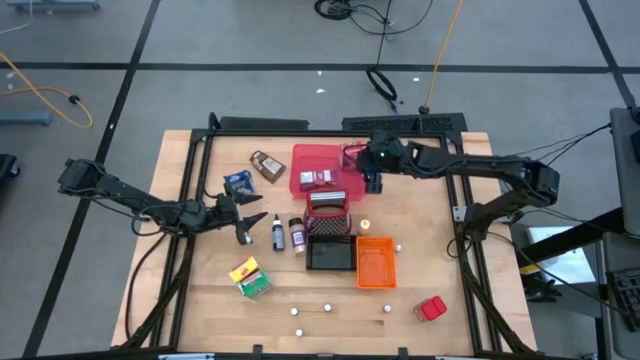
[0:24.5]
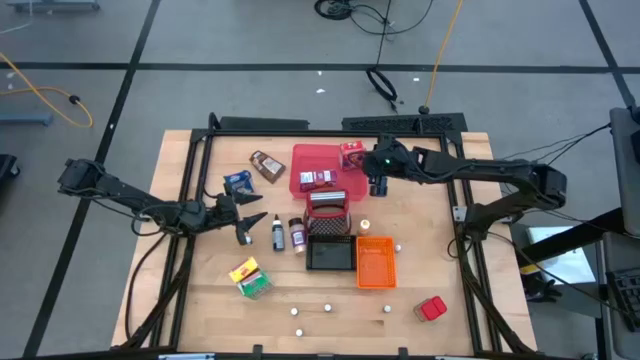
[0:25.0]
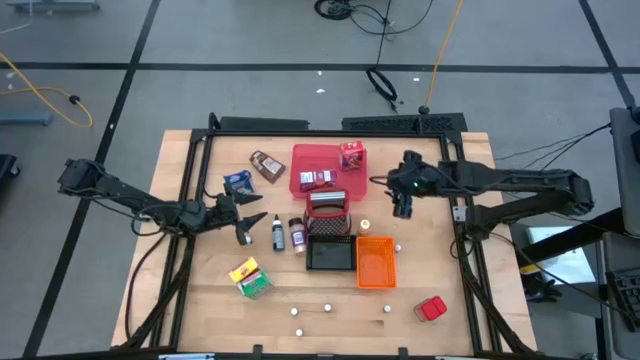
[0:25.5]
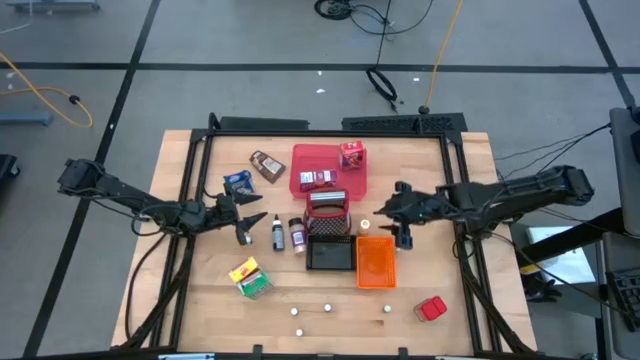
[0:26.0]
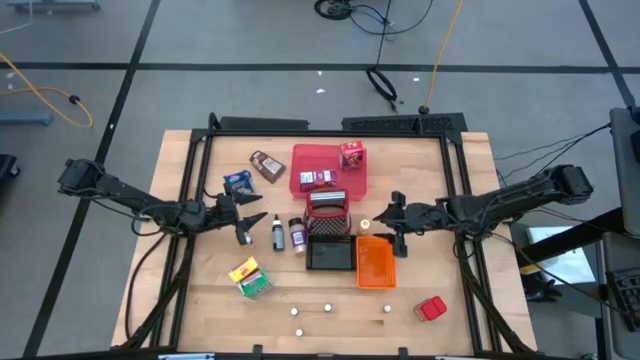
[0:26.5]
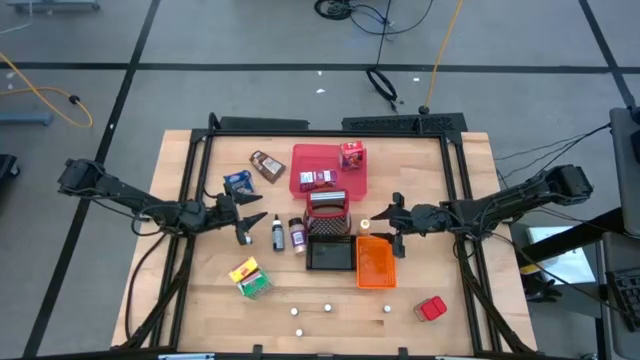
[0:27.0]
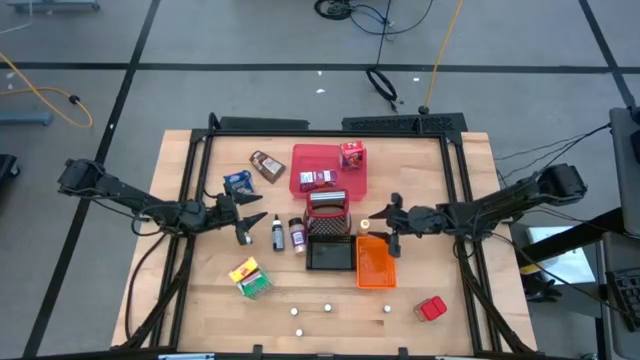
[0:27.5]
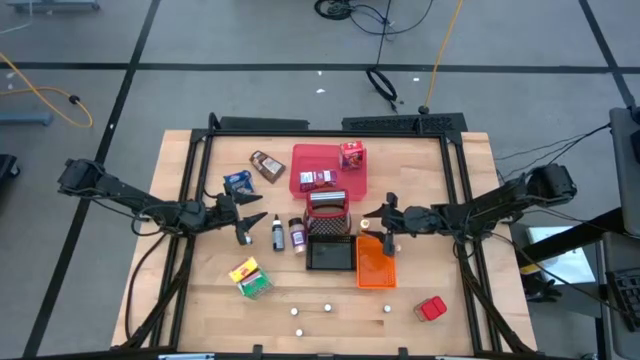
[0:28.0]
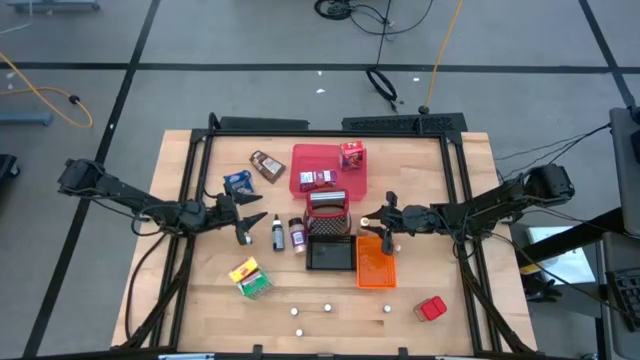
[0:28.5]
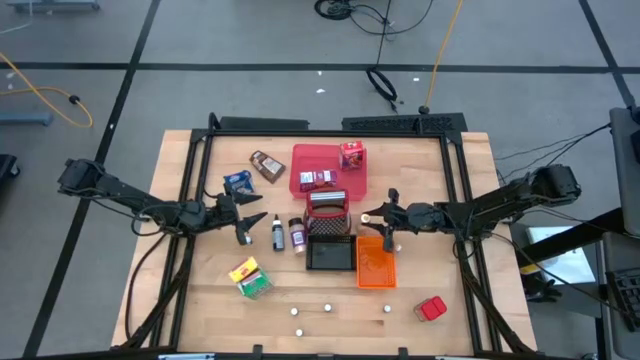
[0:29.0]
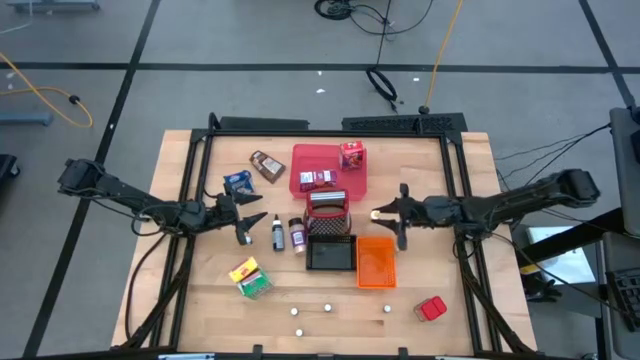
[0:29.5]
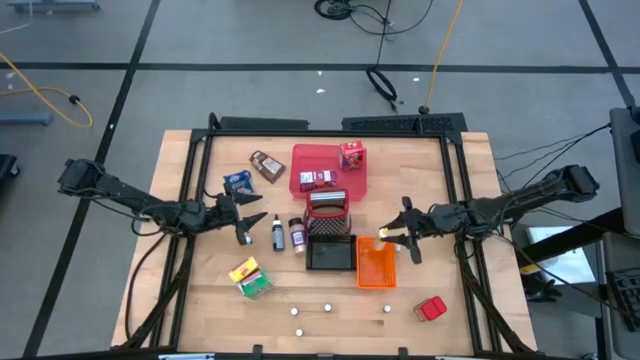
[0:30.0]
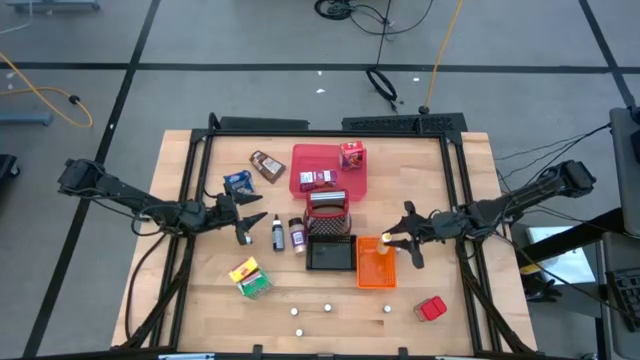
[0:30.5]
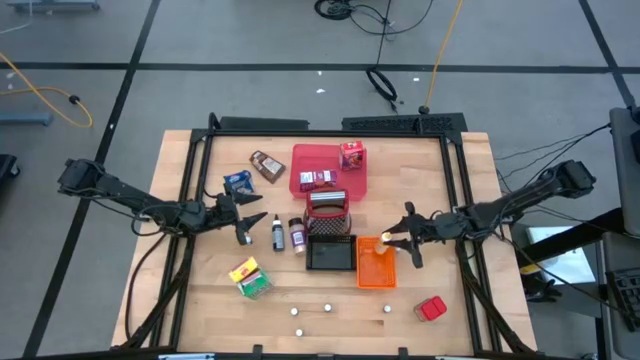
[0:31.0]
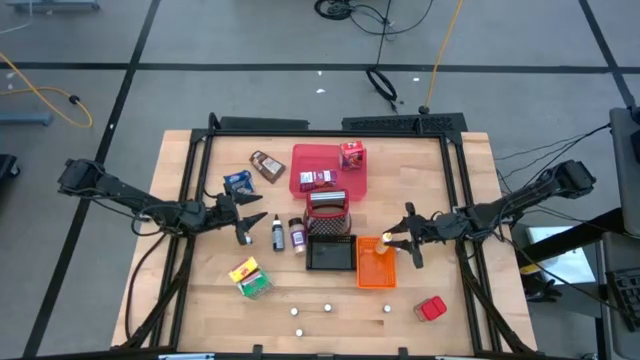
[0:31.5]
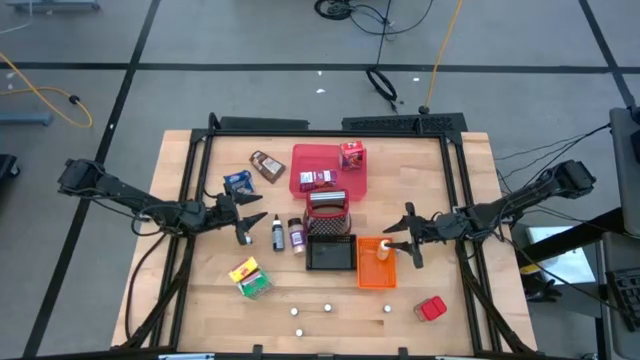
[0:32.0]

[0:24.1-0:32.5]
Task: Pick & Place Kitchen Items
Put the yellow food coloring bottle into the orange bin

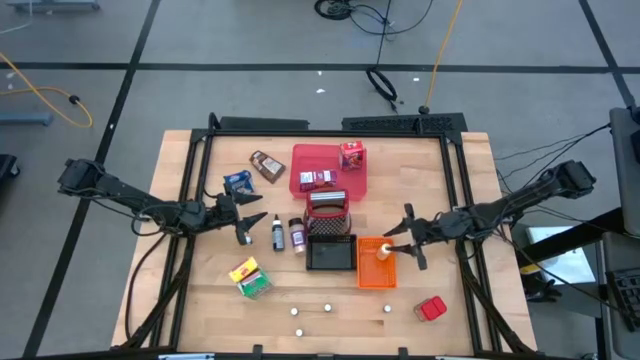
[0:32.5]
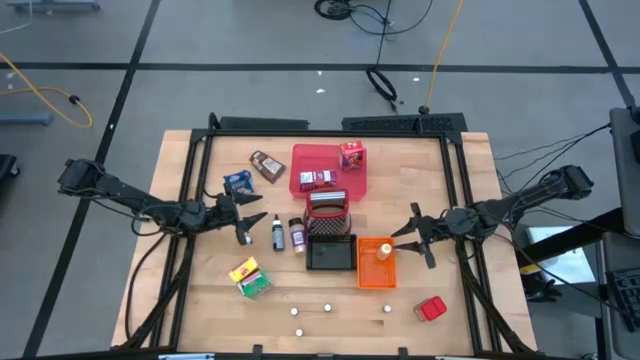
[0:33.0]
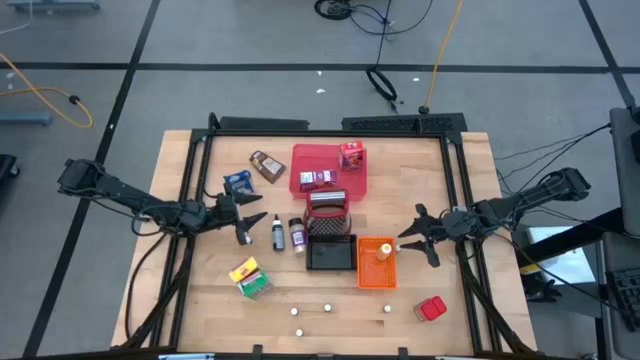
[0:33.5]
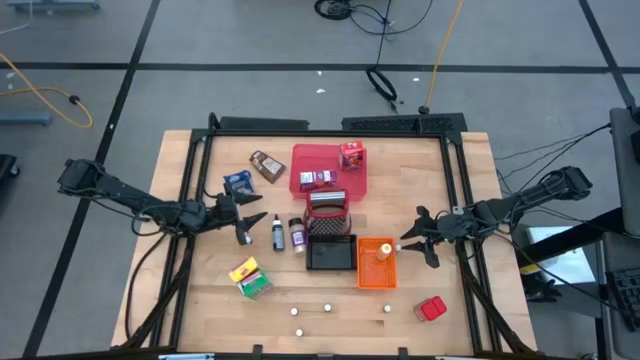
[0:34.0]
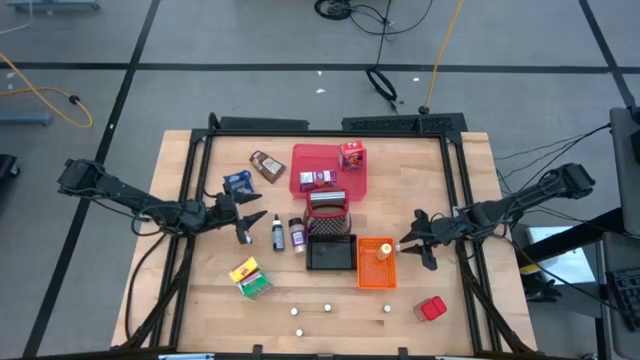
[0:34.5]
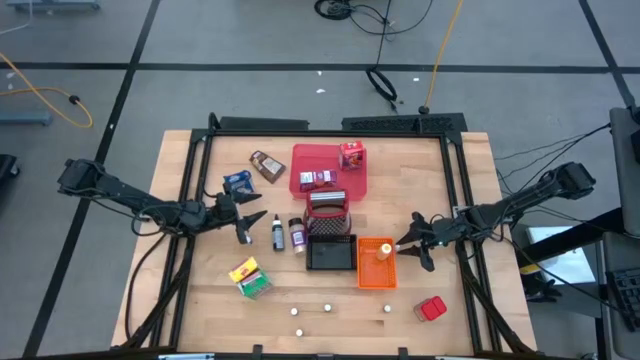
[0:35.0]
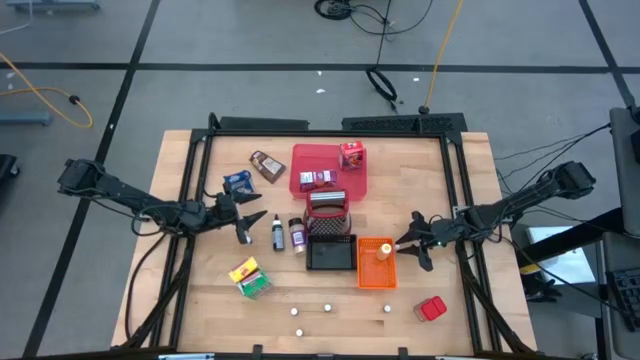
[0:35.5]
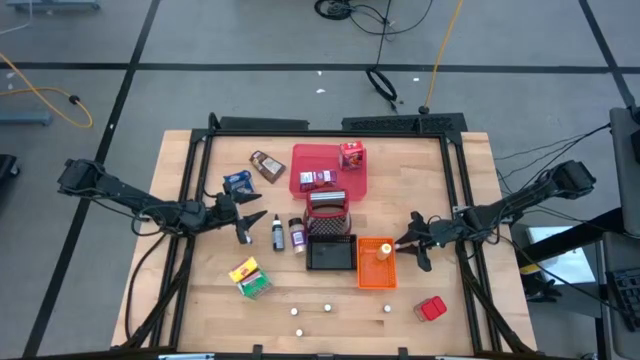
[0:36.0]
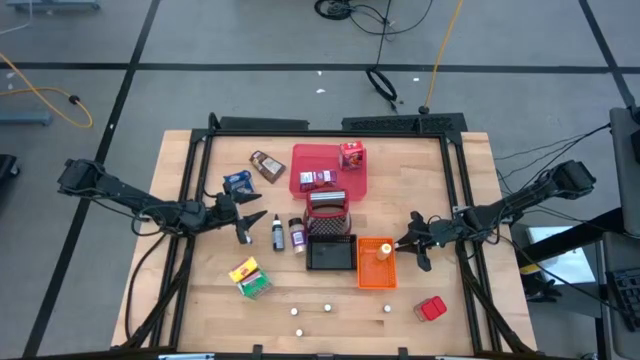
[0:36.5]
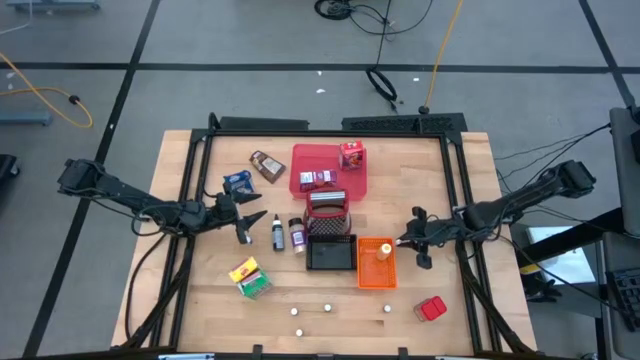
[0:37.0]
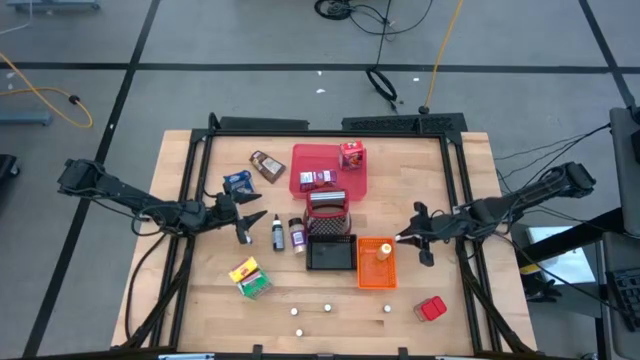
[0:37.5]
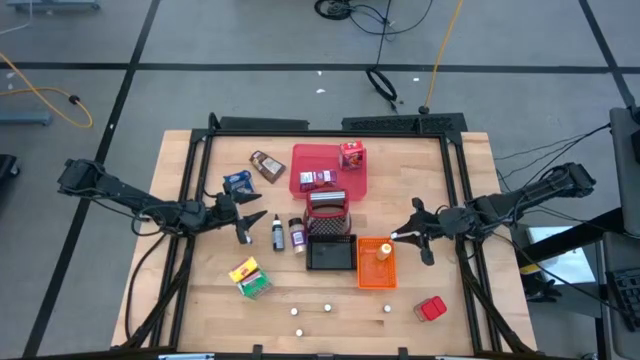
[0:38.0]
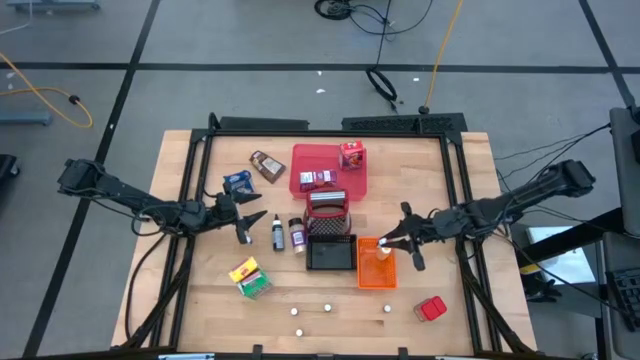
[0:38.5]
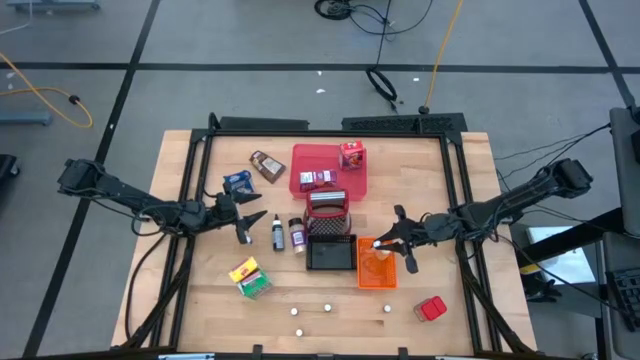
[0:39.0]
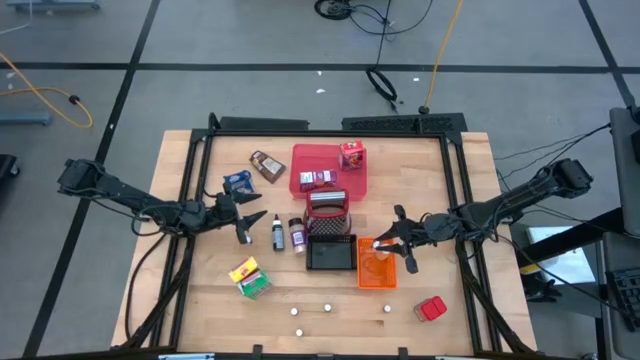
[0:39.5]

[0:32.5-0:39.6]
Put the pink food coloring bottle into the orange bin

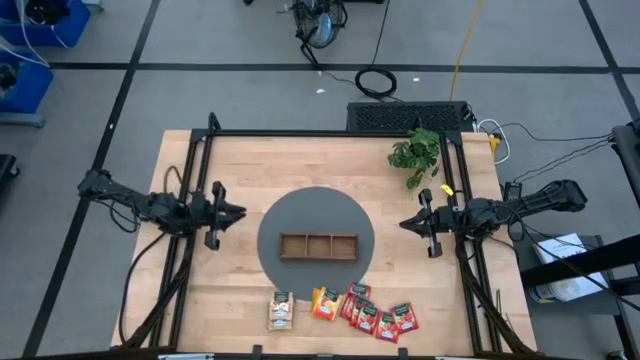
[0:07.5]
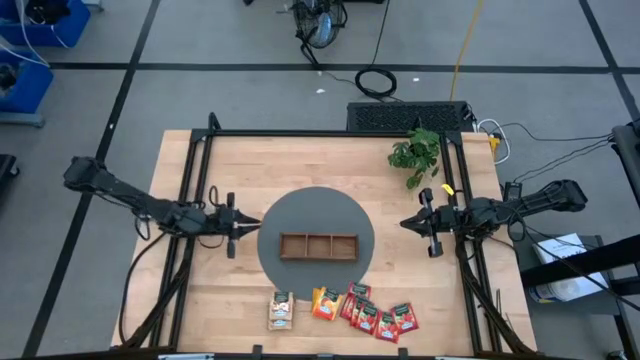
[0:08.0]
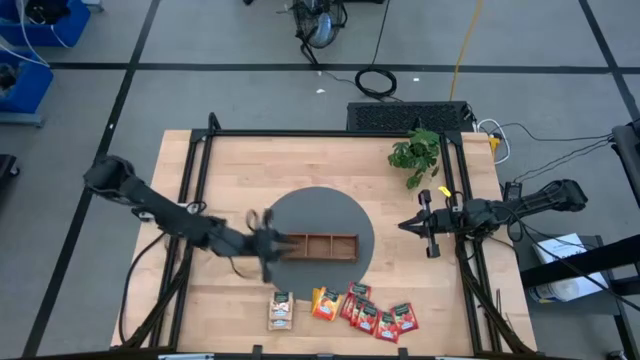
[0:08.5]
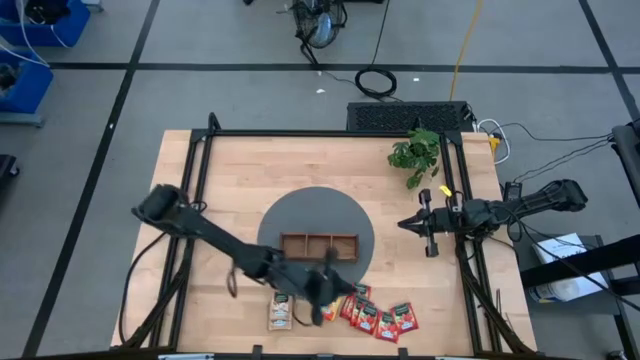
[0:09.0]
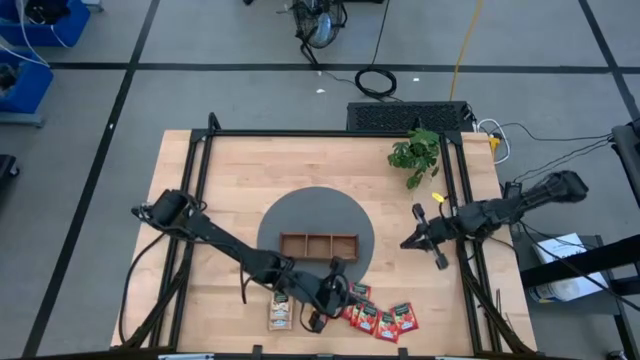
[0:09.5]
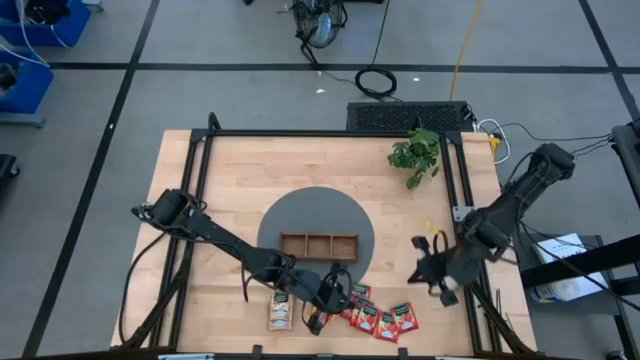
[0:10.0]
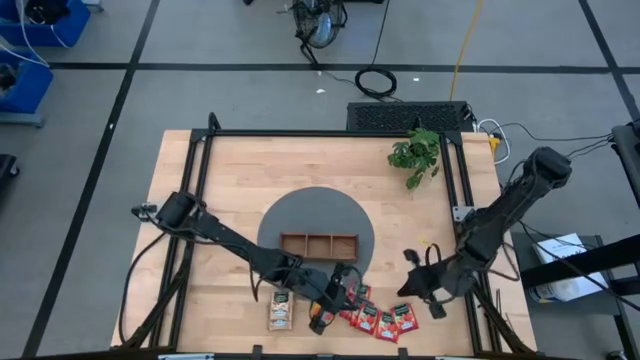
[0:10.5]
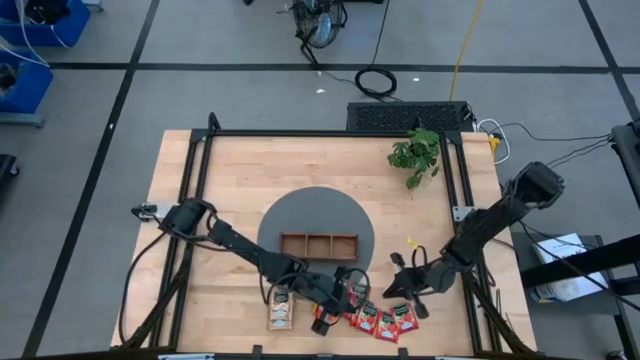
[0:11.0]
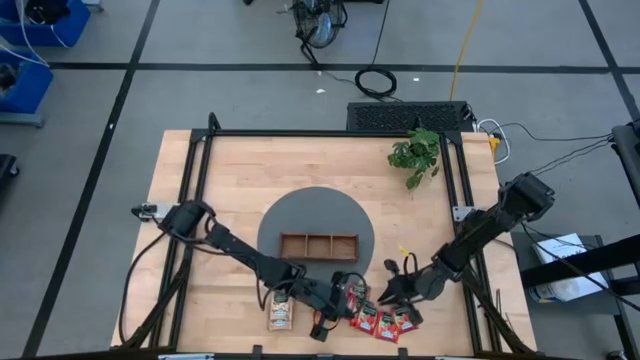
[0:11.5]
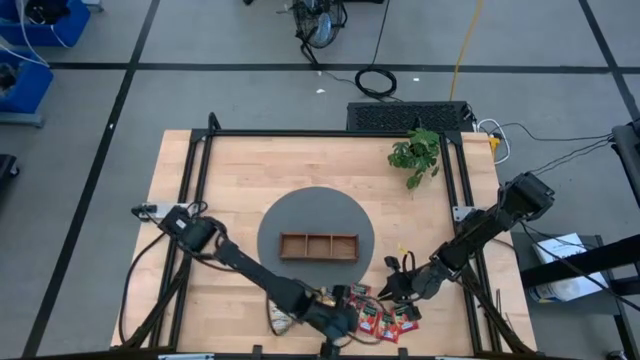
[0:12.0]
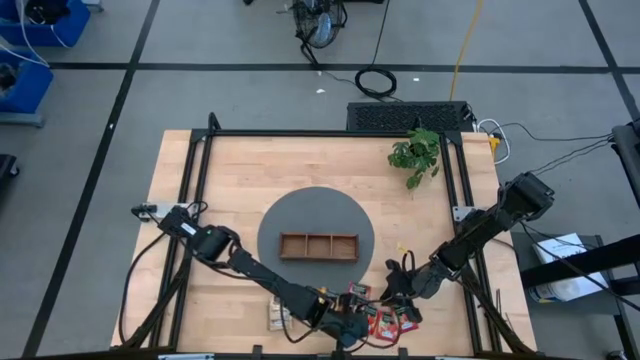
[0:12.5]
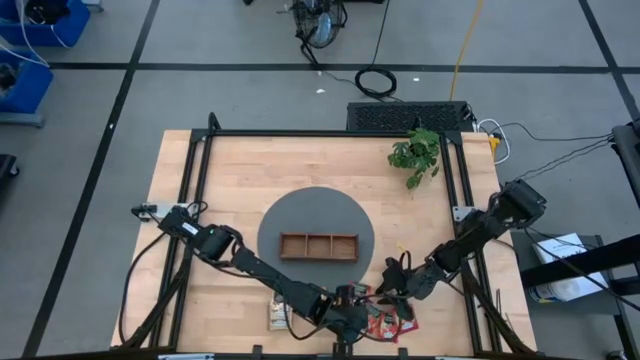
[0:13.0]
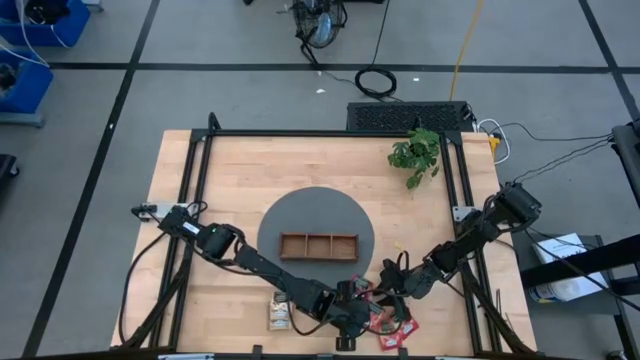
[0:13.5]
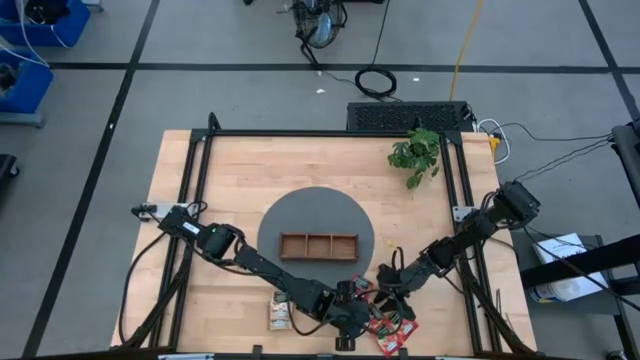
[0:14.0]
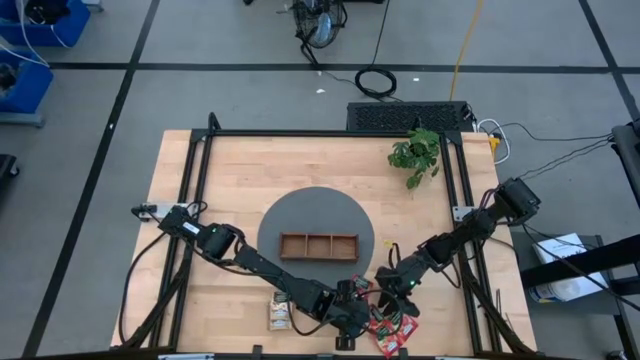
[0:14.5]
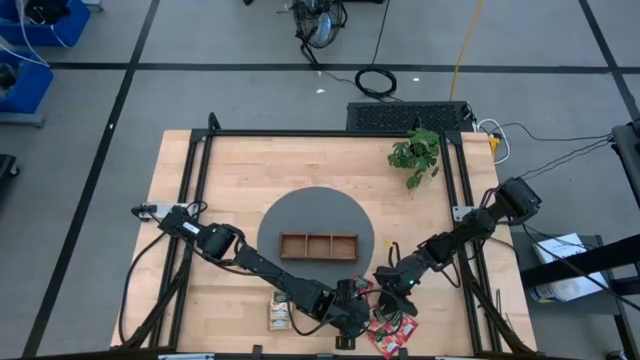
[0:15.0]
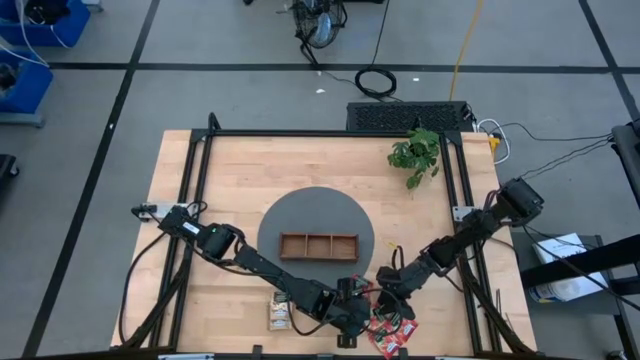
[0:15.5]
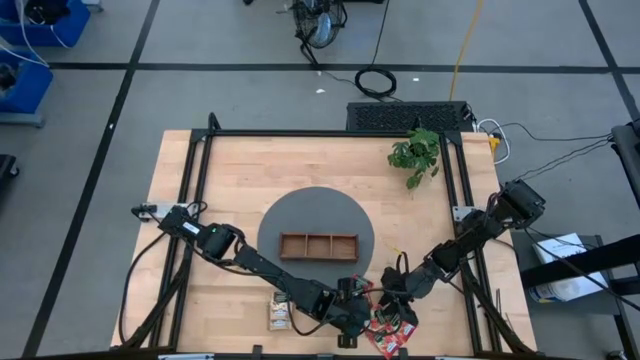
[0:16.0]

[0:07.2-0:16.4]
Task: Pick & Place Tea
Put the red tea sachet into the right section of the wooden organizer
